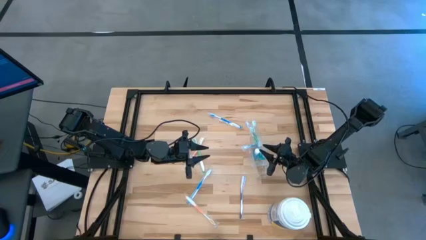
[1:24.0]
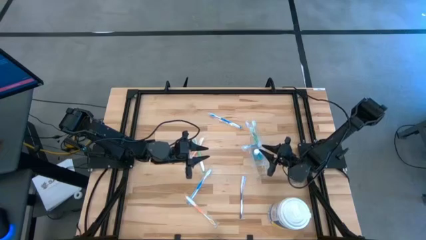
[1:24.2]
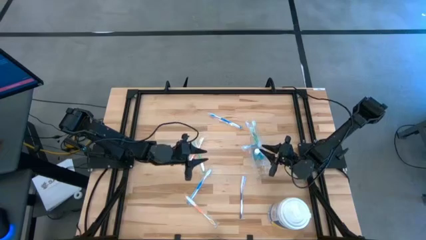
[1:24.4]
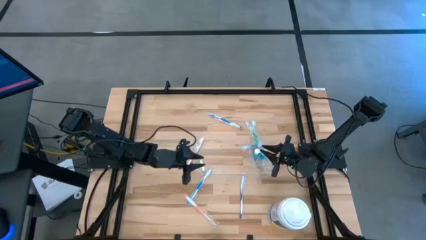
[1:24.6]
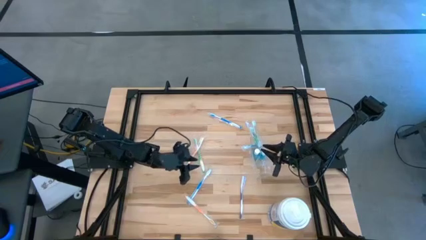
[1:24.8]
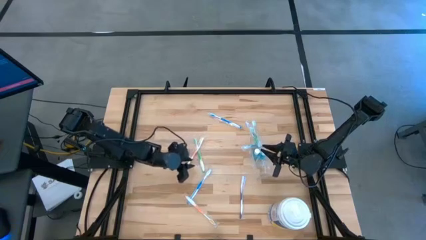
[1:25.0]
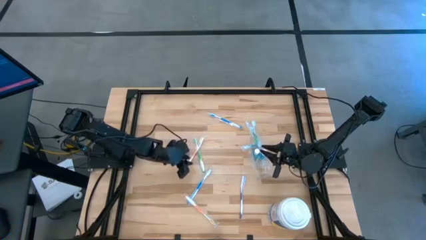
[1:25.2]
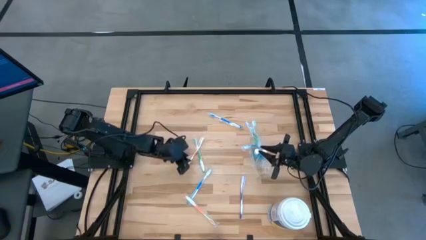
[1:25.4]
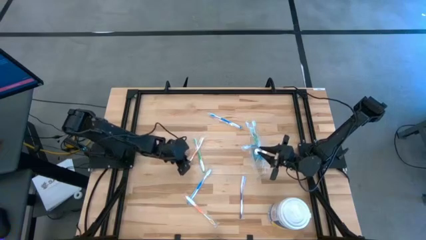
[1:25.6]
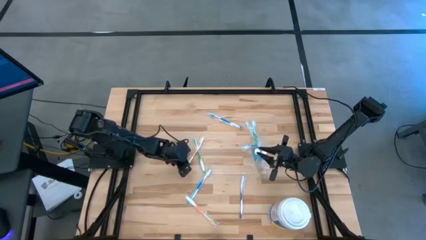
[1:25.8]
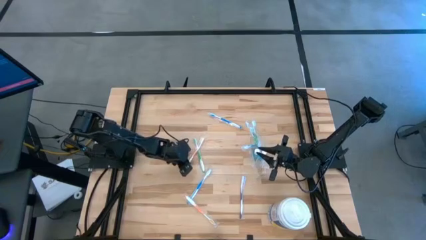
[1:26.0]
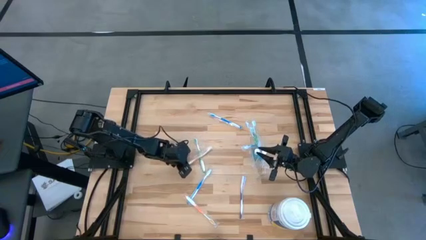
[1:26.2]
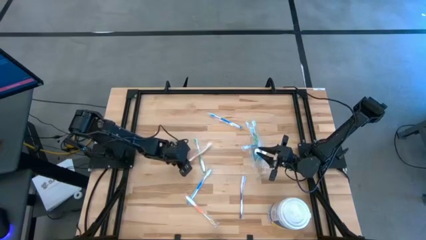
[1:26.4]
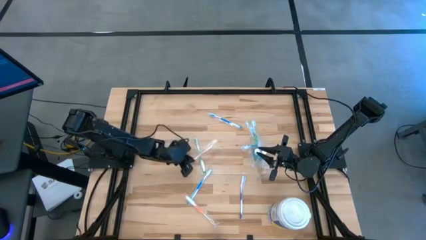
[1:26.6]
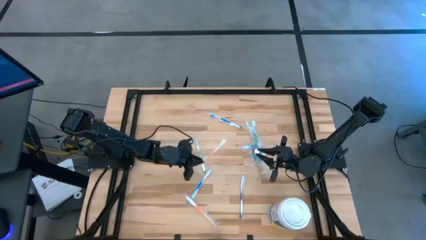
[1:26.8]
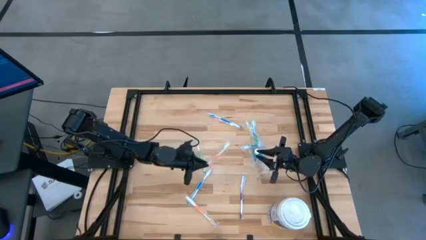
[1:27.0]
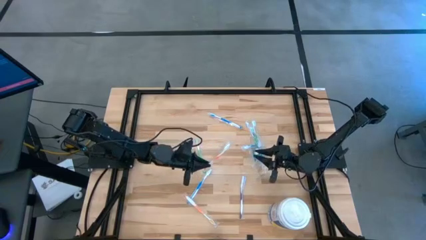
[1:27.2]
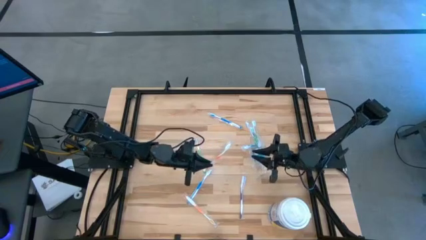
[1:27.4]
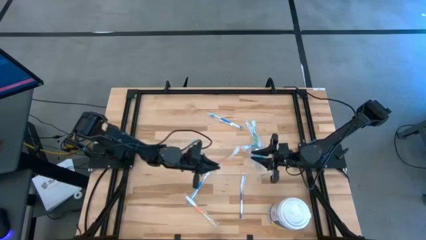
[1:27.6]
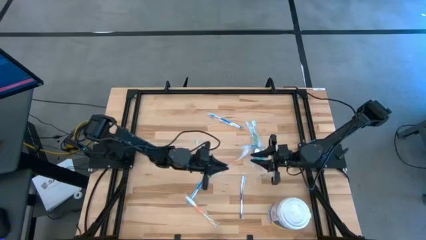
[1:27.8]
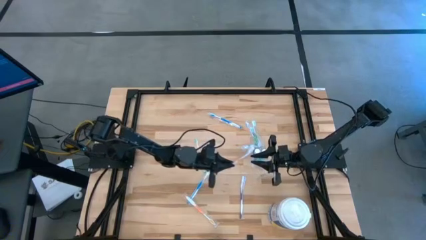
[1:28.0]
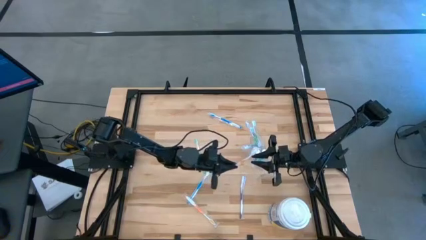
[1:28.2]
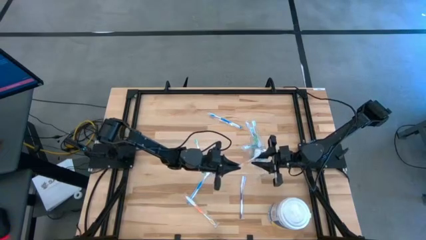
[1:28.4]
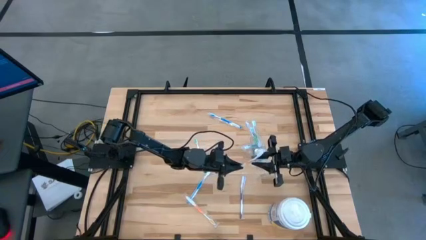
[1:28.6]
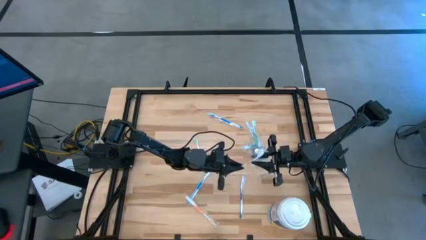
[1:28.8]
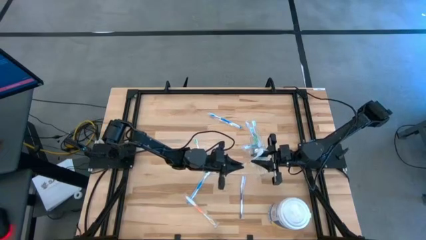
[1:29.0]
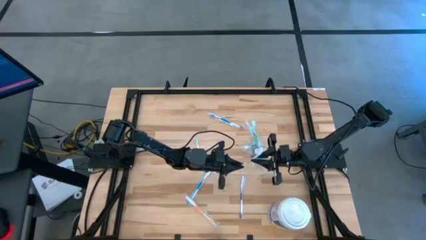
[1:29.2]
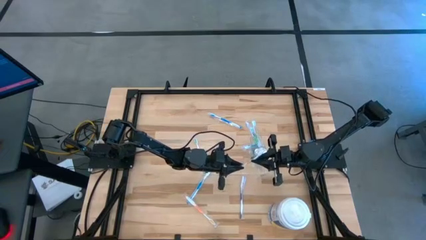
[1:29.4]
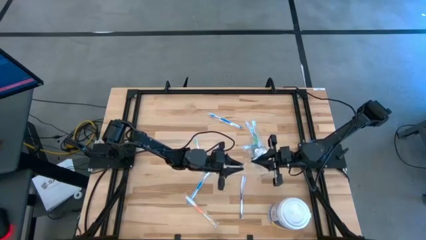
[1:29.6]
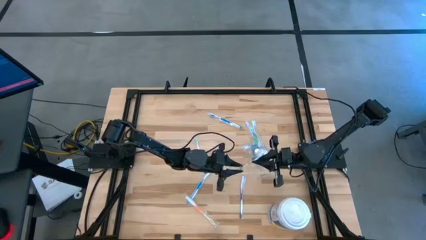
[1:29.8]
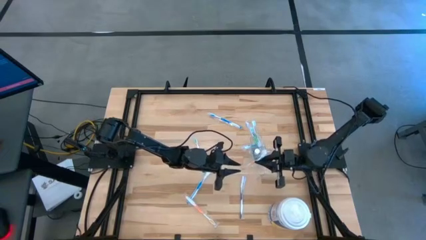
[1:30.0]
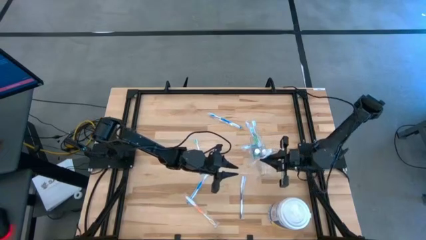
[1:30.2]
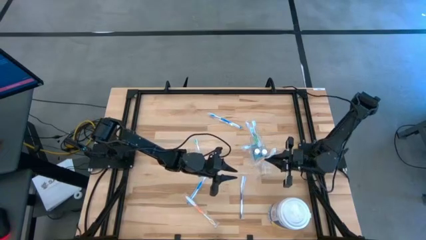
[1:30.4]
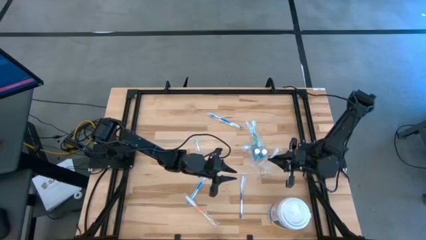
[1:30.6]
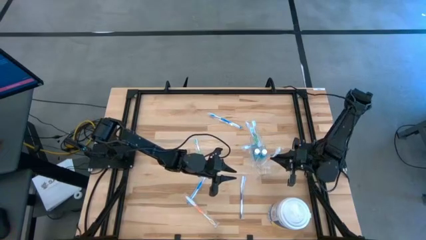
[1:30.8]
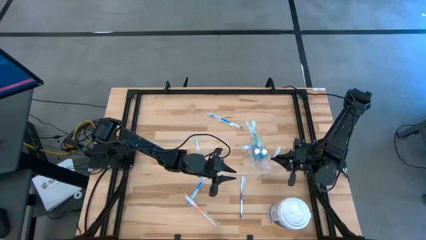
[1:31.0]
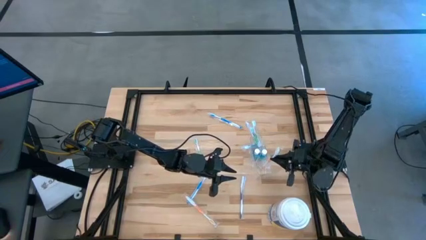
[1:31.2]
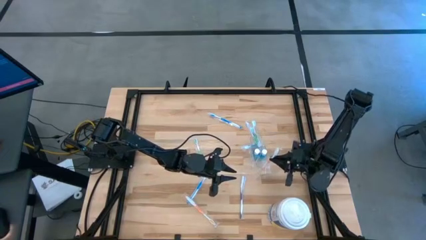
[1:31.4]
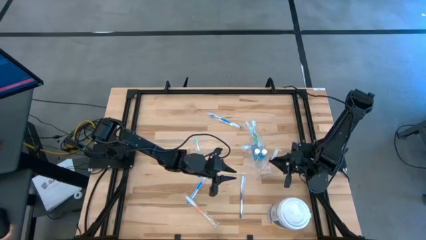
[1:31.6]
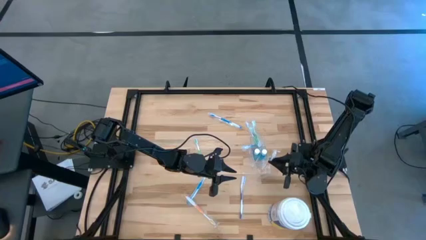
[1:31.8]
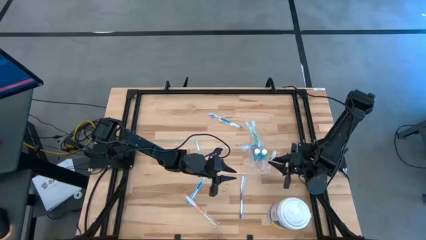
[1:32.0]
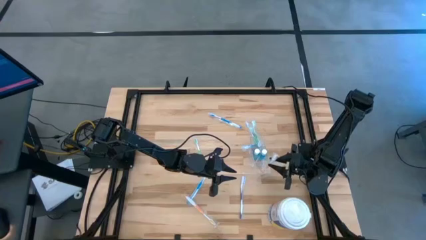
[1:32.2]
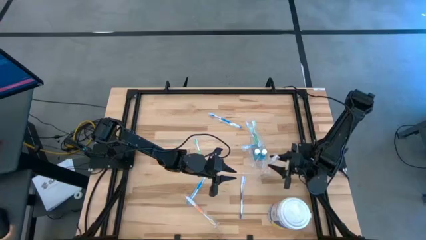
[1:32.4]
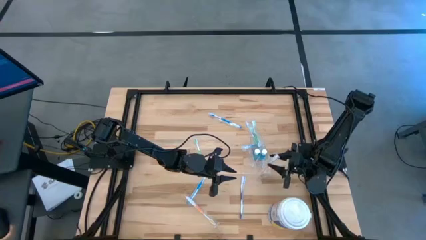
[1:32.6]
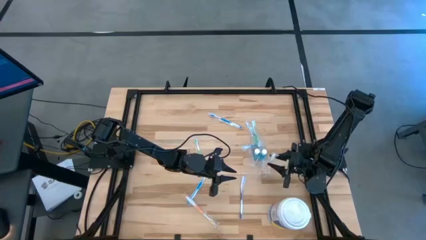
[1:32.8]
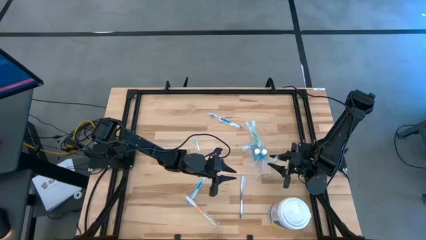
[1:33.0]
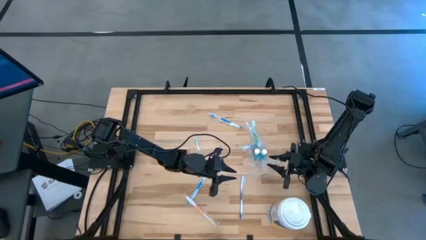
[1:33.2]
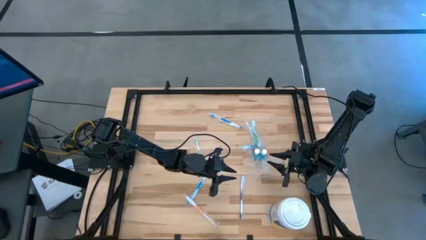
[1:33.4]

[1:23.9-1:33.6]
Task: Pick & Place toothbrushing station
Put the top orange toothbrush into the transparent organizer

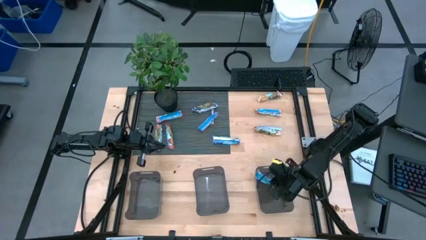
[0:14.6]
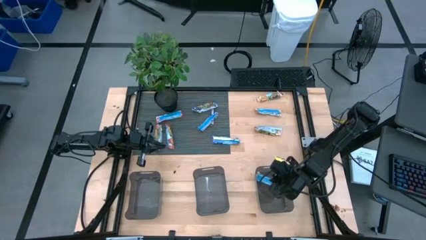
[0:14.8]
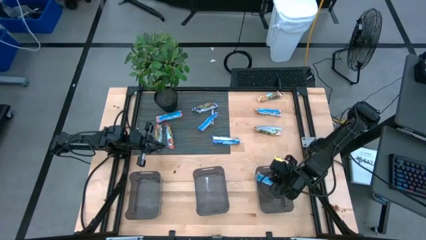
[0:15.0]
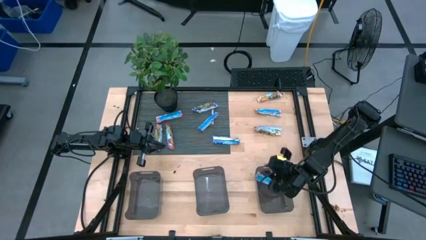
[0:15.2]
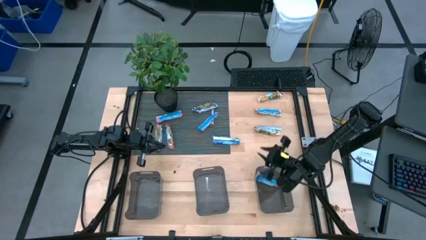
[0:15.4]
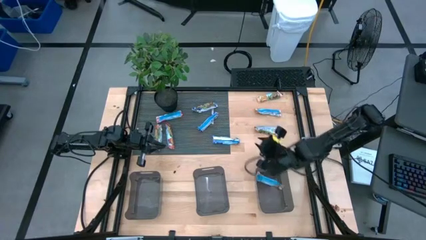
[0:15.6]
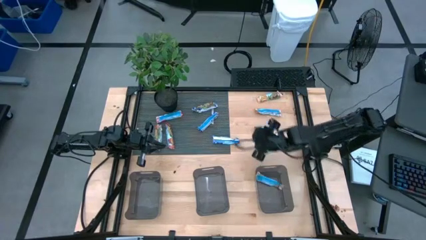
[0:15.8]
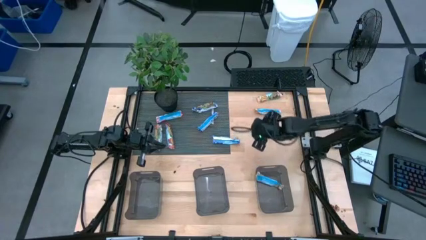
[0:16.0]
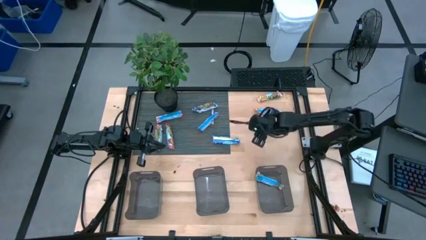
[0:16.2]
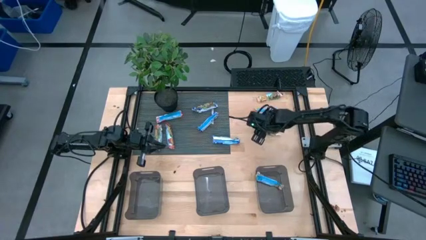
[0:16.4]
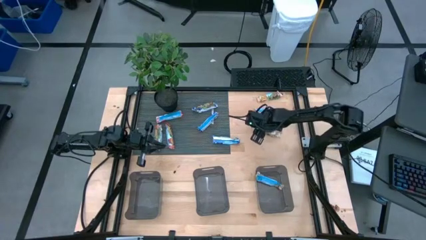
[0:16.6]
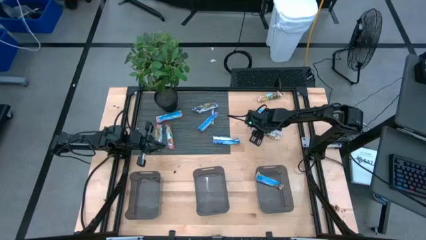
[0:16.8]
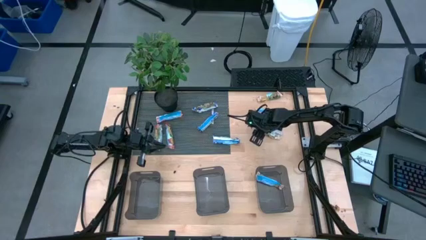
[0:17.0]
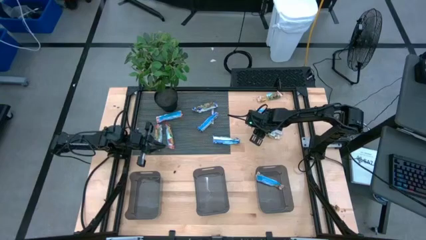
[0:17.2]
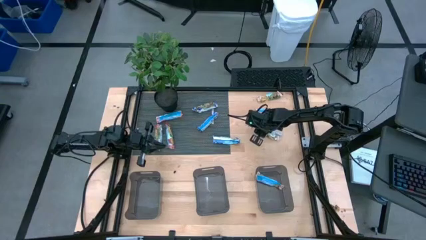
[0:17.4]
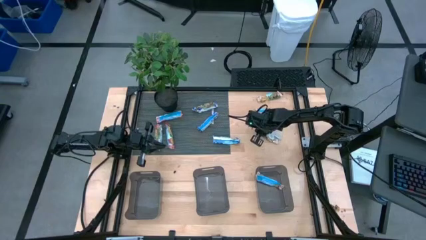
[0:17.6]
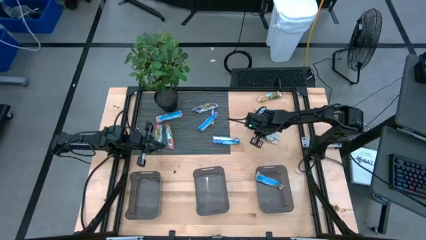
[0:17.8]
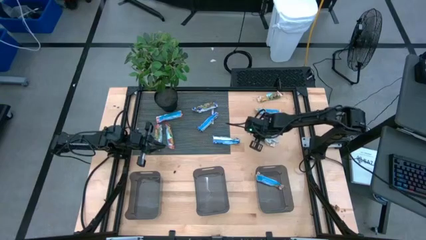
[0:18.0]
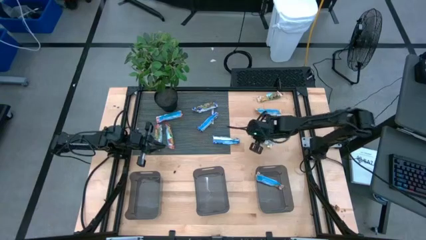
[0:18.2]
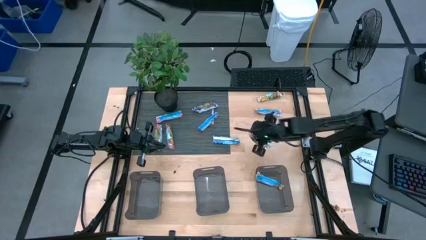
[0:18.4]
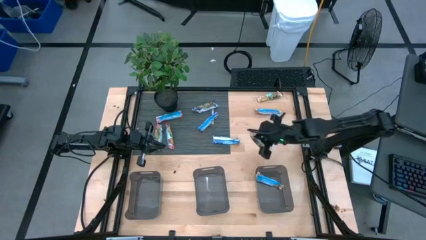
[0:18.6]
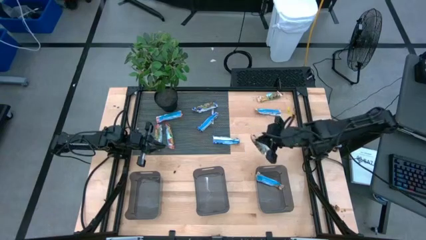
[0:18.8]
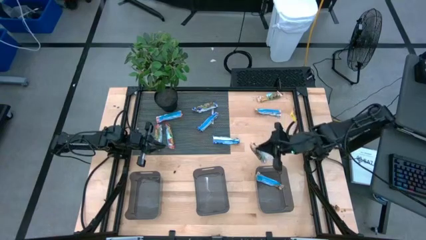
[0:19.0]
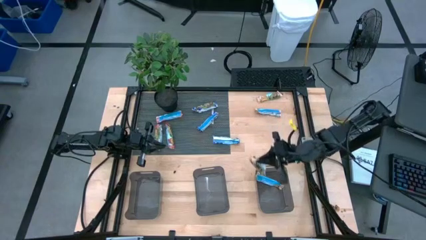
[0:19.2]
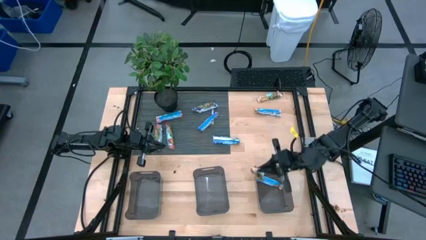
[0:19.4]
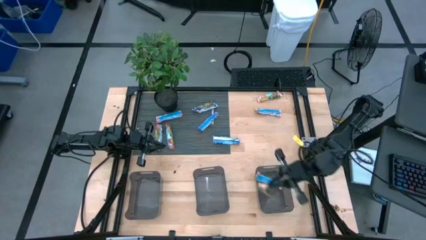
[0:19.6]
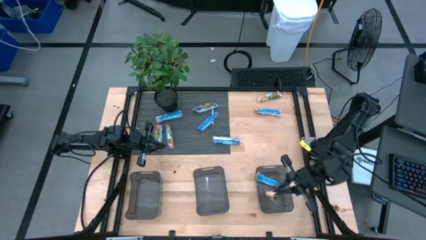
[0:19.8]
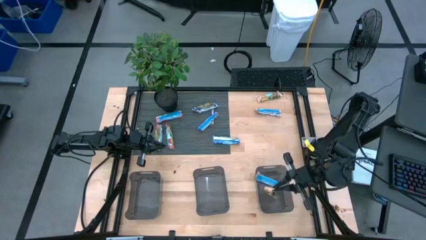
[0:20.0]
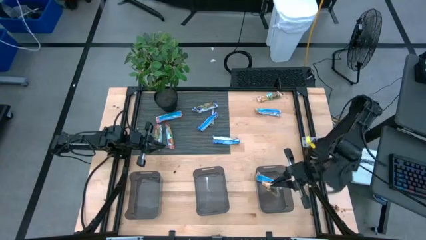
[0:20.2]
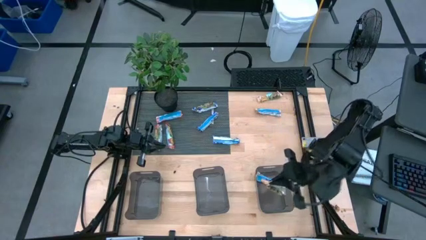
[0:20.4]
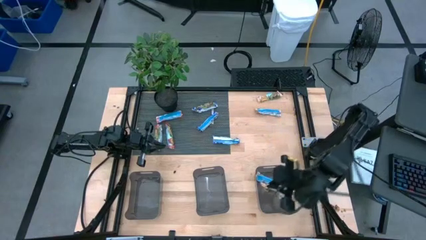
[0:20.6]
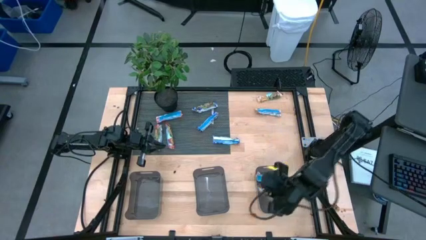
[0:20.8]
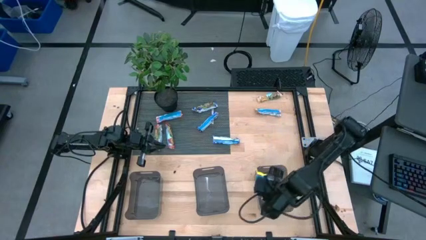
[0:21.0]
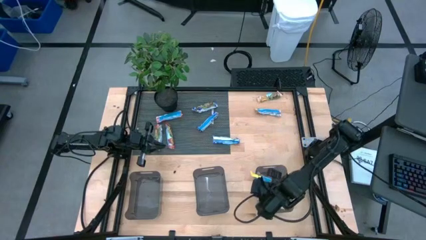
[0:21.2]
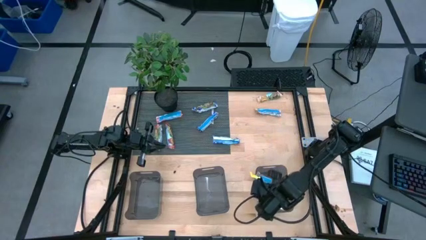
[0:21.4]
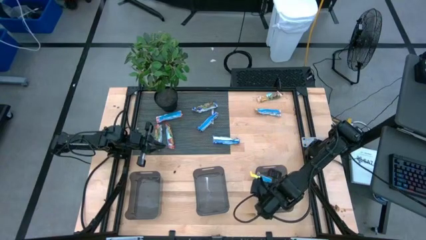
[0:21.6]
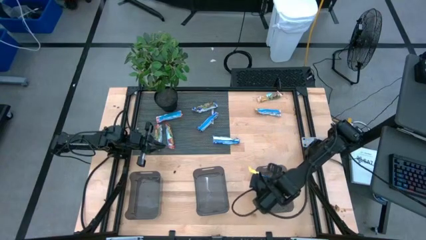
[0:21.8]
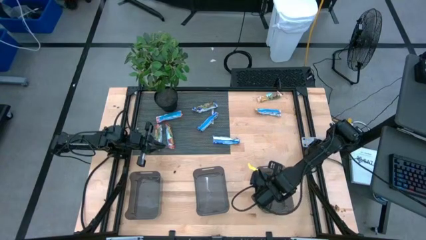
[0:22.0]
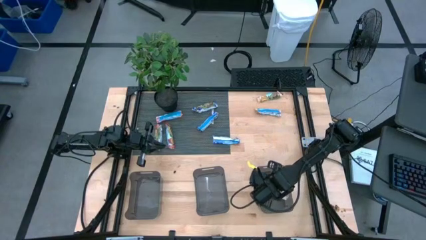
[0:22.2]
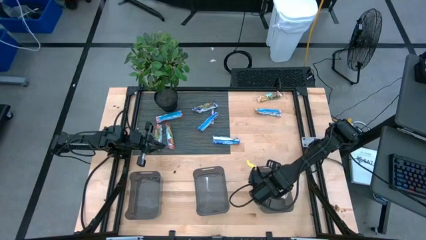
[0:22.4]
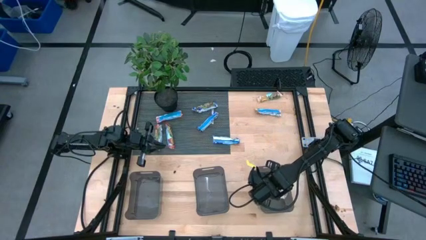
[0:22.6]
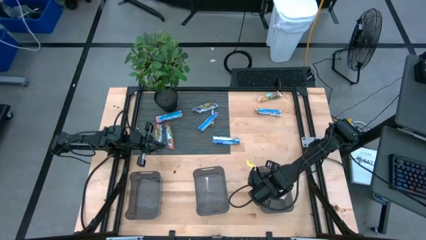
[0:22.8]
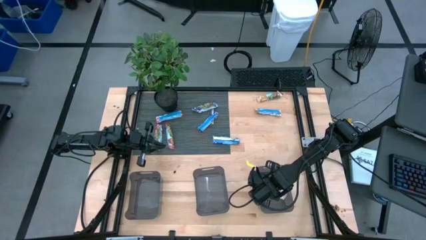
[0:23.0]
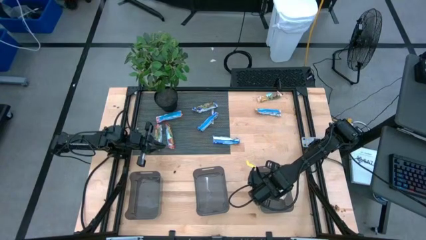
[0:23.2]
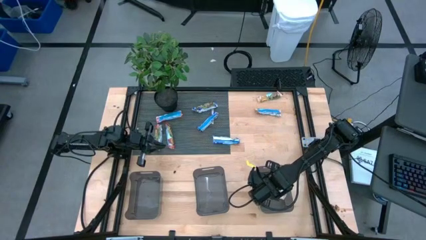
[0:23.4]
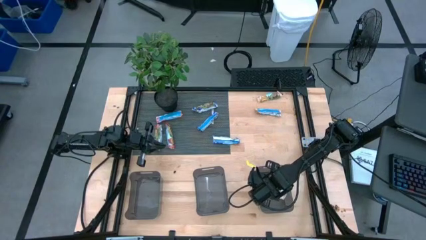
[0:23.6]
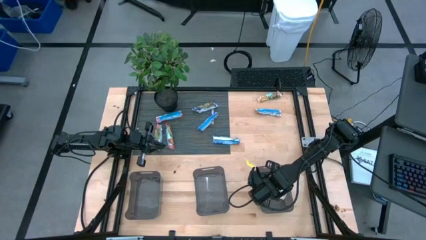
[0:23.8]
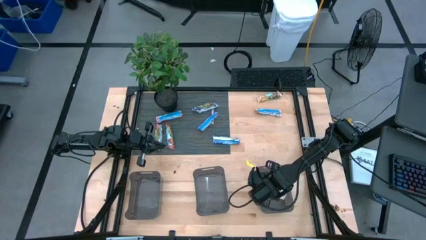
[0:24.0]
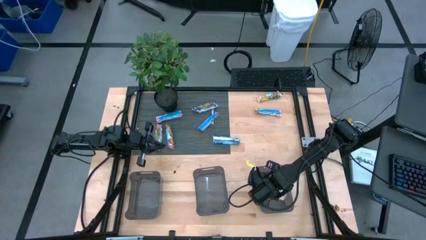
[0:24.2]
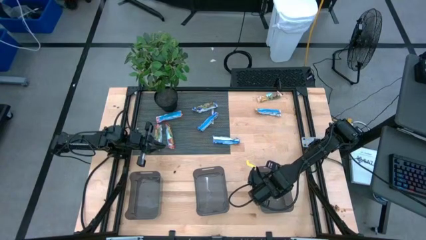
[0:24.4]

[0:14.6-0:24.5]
Task: Pick and place Granola Bars by type
Put the yellow granola bar into the right black bin
